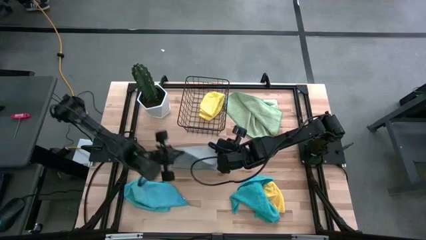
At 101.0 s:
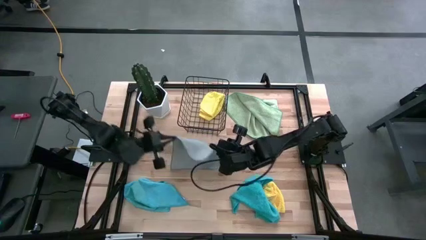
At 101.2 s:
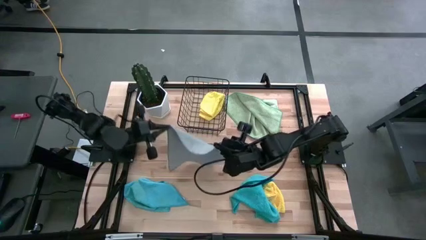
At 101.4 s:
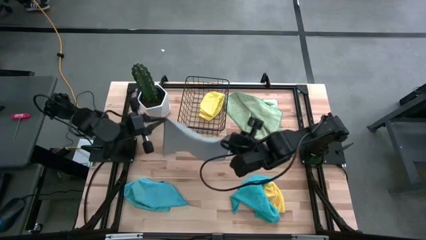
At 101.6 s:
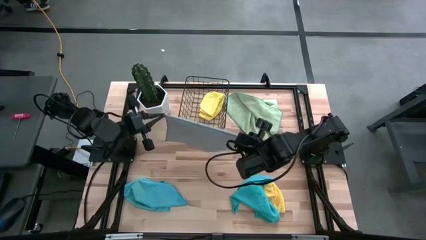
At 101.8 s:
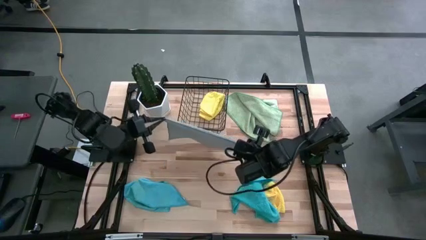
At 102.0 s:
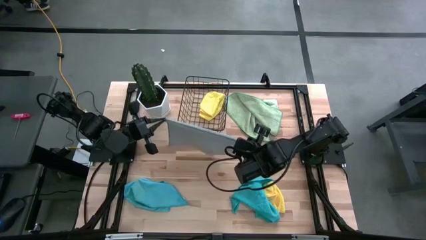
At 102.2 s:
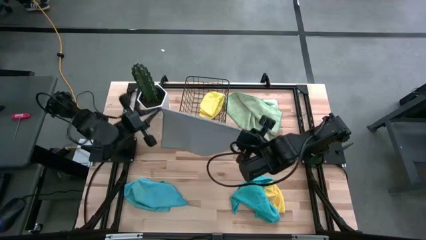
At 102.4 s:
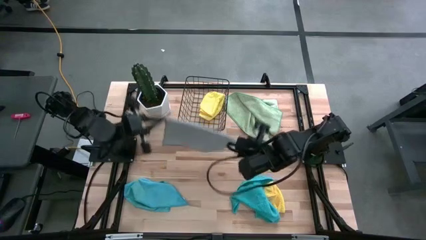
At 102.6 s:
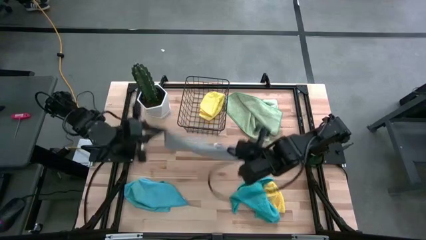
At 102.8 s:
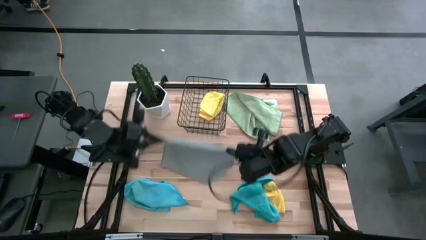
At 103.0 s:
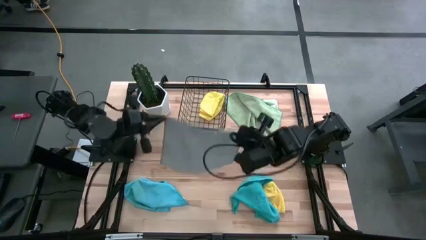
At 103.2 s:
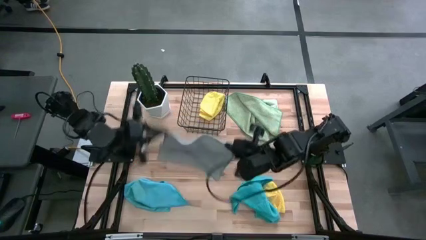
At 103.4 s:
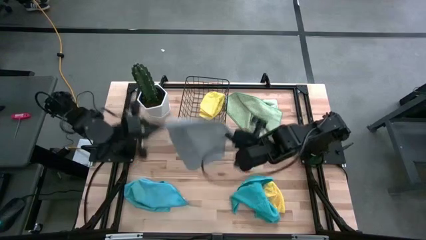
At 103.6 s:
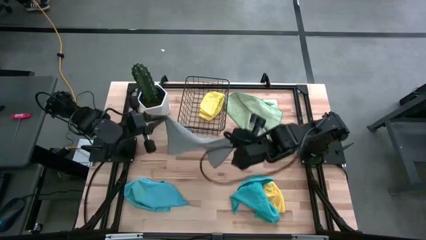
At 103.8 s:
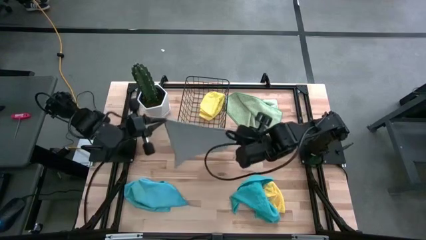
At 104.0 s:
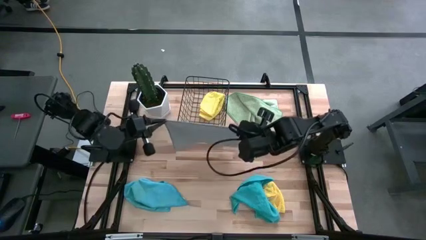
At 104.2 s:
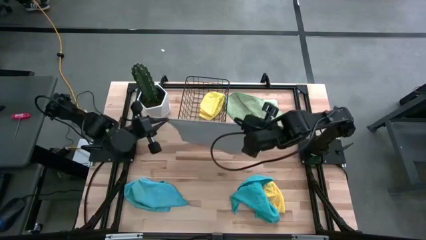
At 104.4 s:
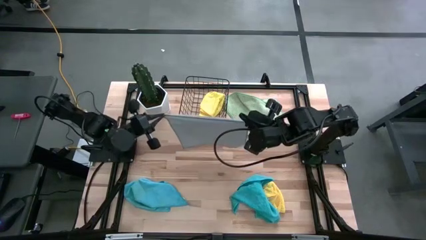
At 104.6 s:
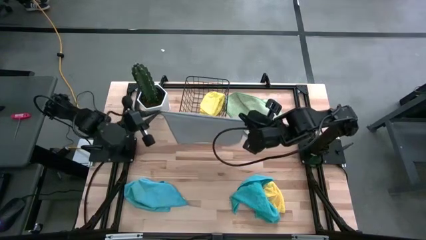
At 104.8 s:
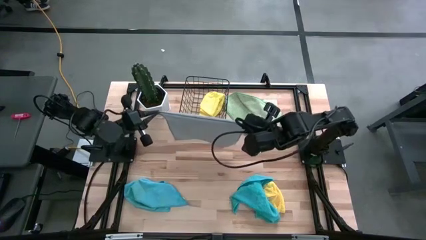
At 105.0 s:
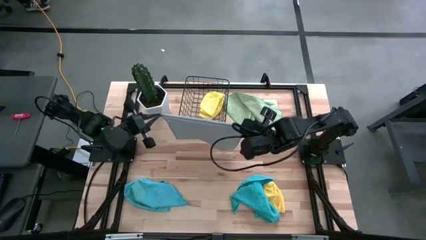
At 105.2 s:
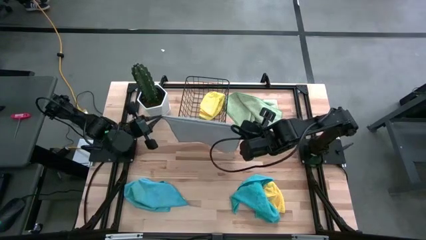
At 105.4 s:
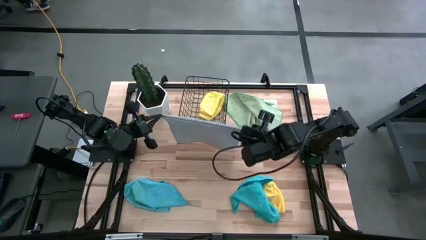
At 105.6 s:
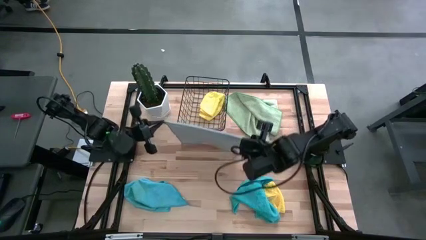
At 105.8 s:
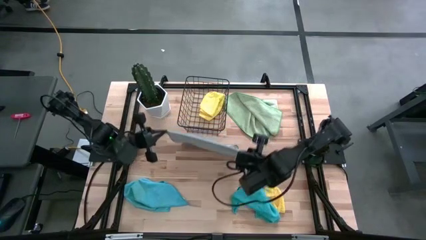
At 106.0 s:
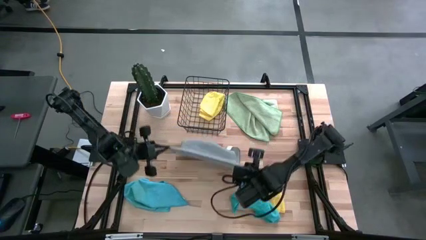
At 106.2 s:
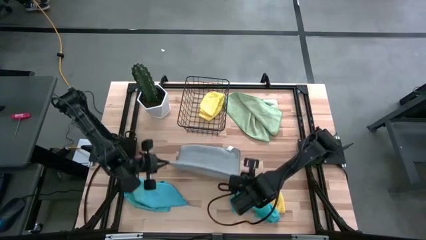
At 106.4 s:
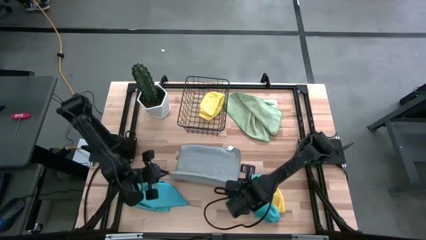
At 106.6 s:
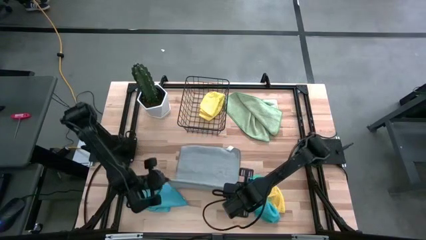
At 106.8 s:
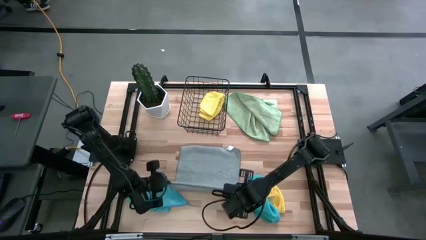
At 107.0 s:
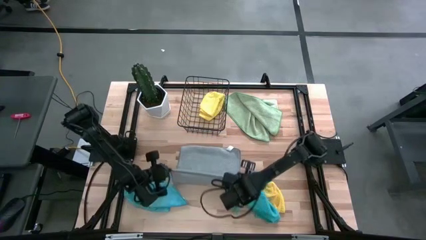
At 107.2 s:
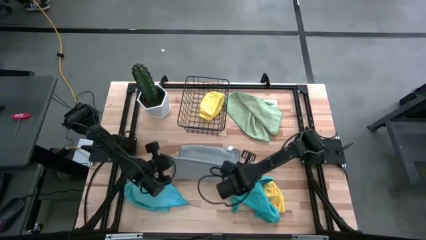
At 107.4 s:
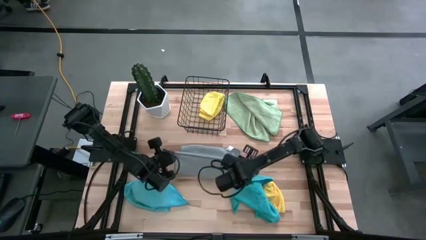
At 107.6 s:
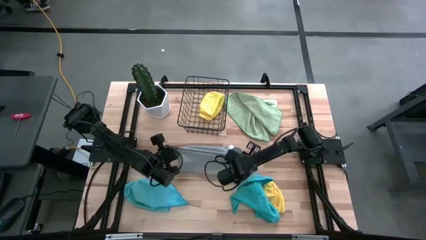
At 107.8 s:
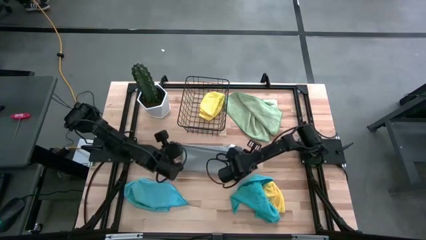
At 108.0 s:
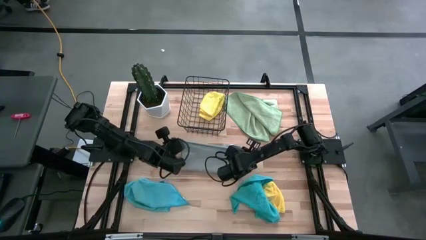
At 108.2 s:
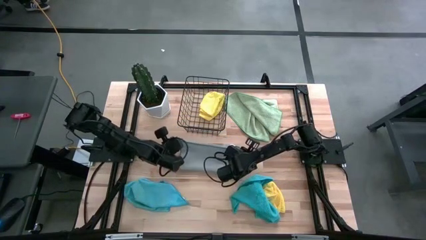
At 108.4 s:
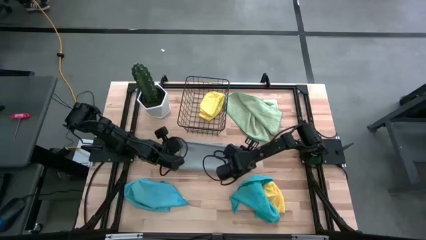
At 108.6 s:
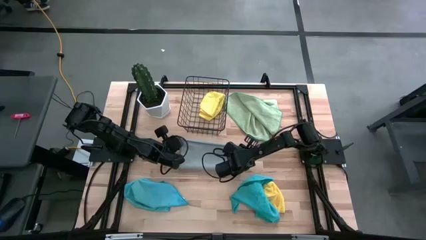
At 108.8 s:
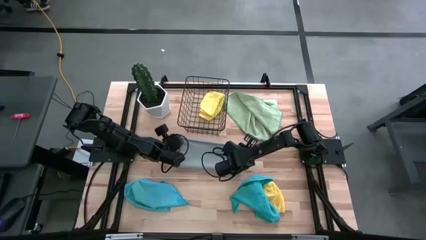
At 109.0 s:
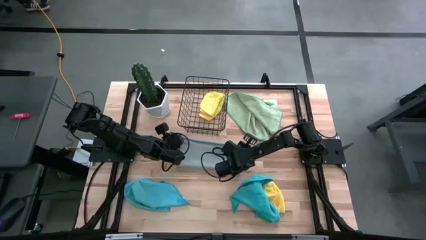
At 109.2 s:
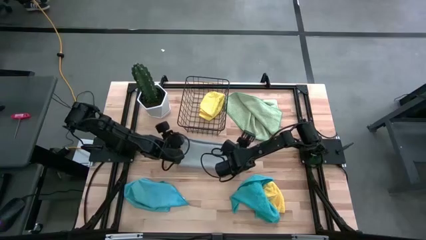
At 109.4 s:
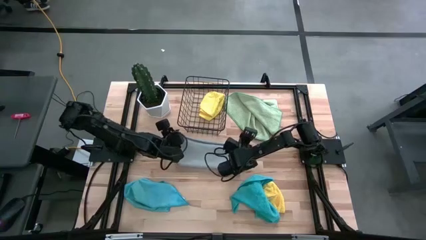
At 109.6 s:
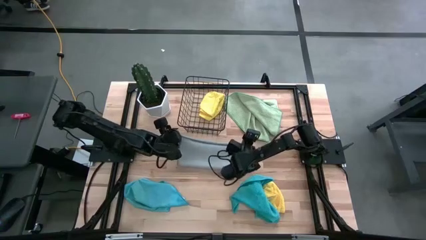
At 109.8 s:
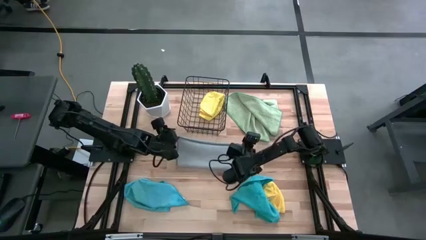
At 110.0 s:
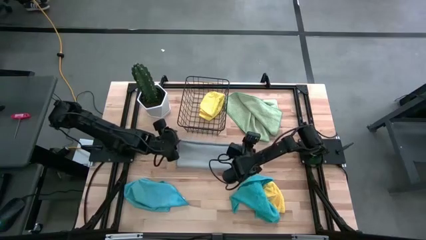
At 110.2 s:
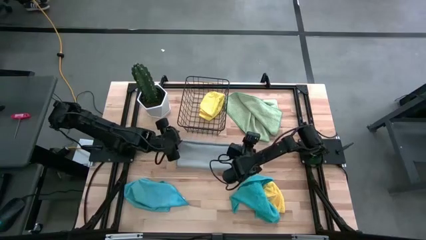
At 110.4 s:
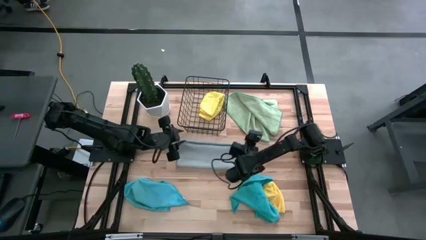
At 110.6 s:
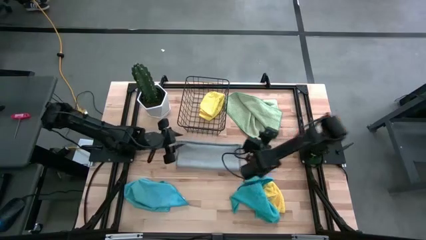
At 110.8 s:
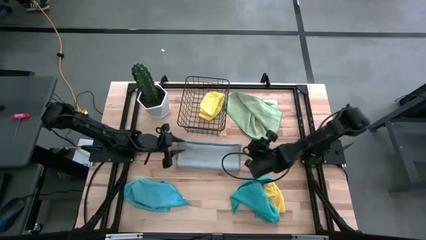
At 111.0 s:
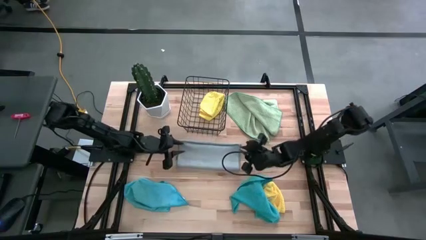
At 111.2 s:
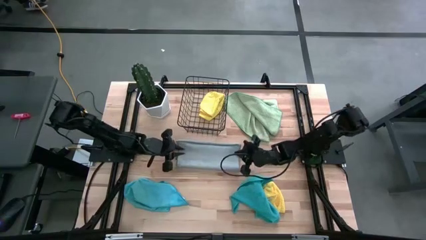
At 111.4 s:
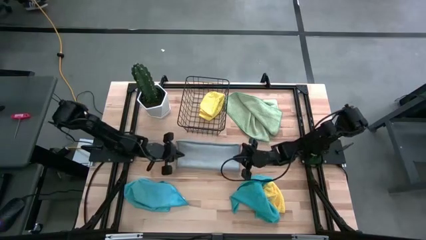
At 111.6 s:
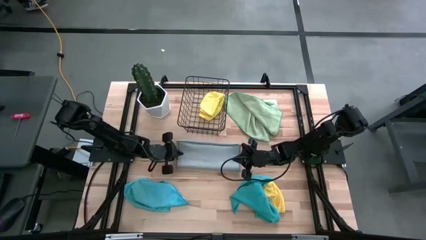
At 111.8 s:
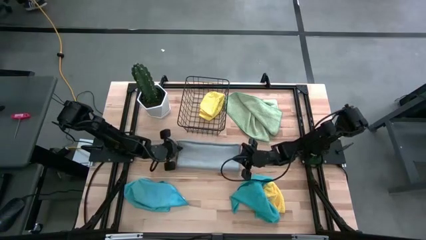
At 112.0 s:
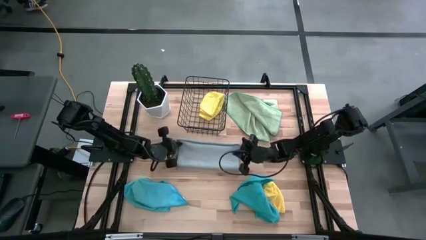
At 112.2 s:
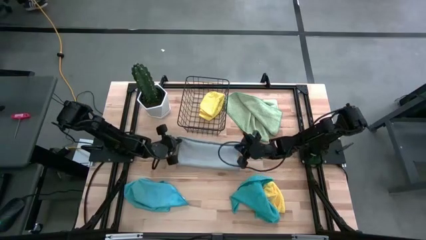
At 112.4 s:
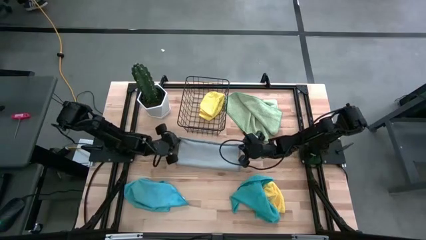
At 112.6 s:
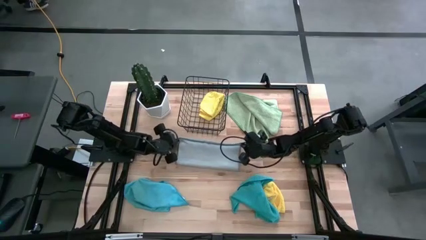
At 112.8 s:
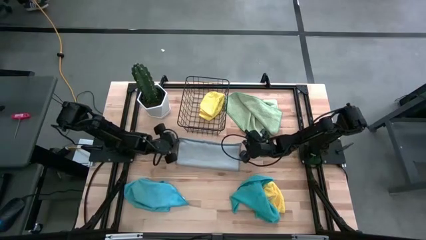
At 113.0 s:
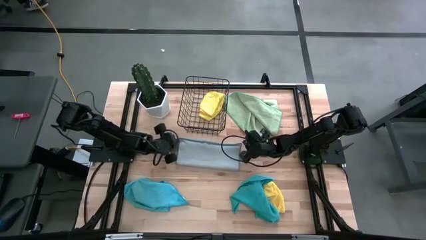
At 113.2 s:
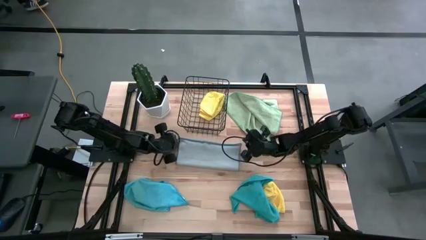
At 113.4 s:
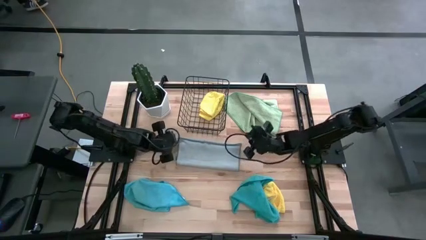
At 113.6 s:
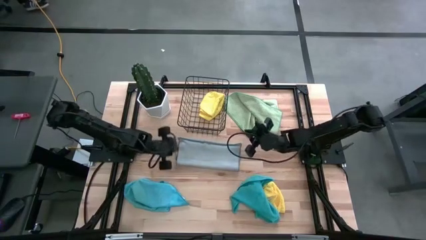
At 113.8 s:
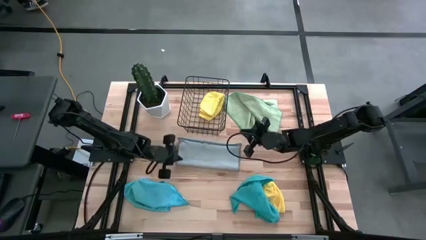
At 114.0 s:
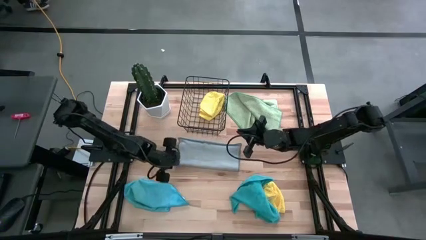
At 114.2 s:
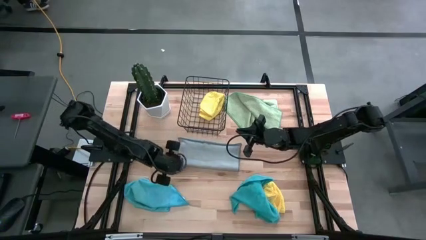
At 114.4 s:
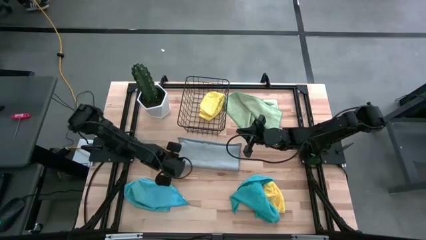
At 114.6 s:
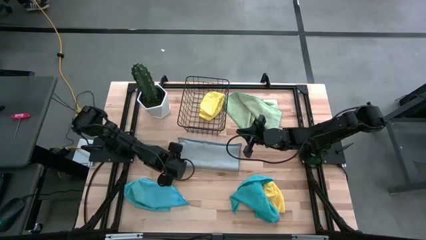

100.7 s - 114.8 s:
Task: Fold microfiber towels
Fold the gray microfiber cloth

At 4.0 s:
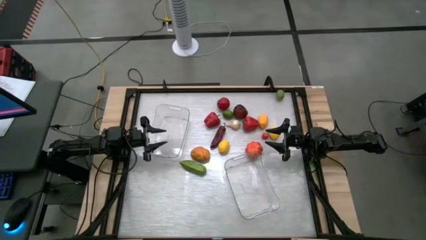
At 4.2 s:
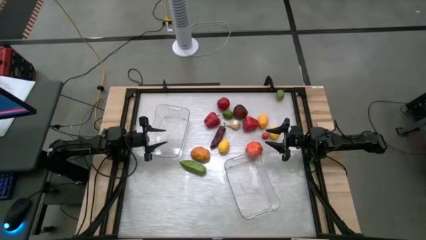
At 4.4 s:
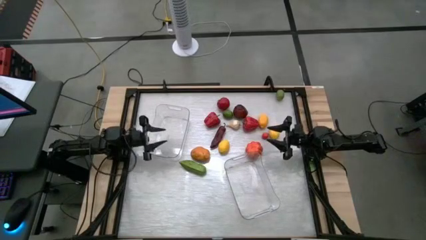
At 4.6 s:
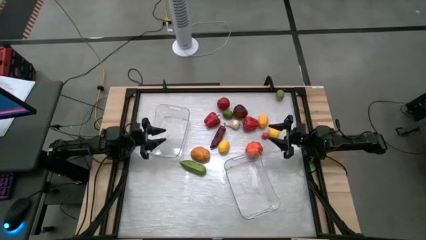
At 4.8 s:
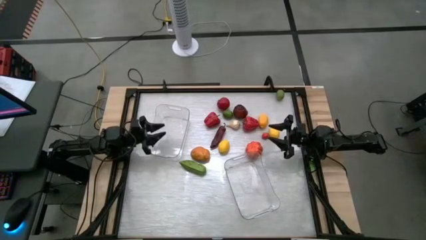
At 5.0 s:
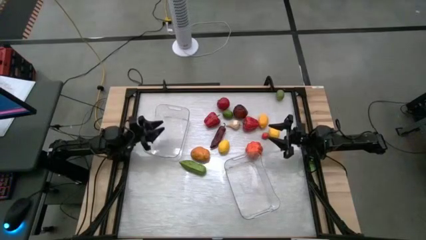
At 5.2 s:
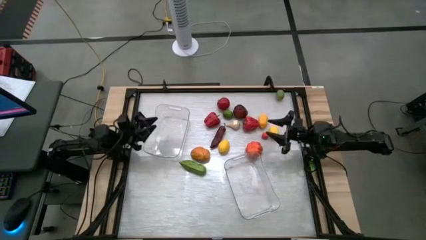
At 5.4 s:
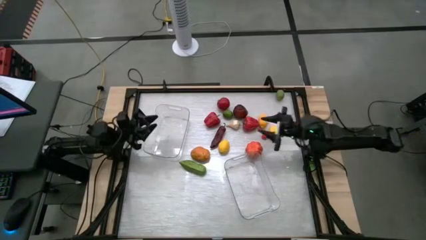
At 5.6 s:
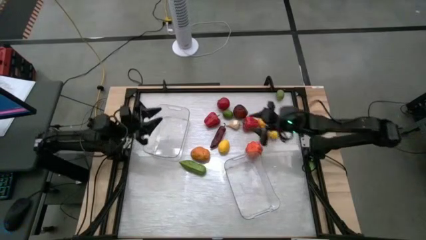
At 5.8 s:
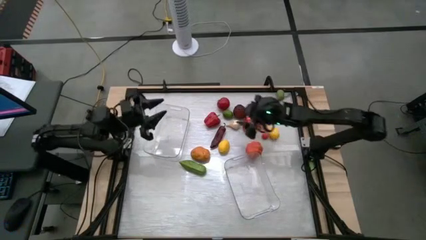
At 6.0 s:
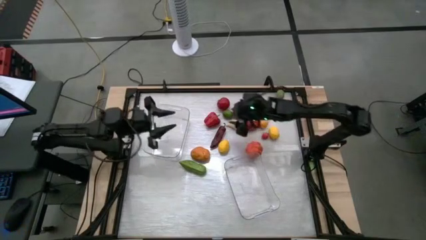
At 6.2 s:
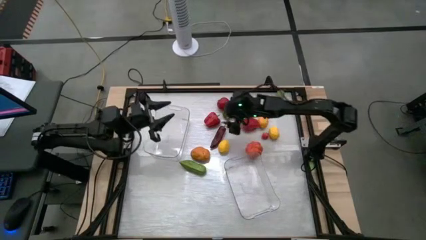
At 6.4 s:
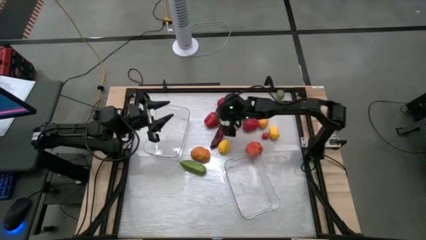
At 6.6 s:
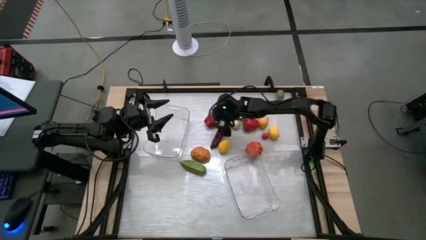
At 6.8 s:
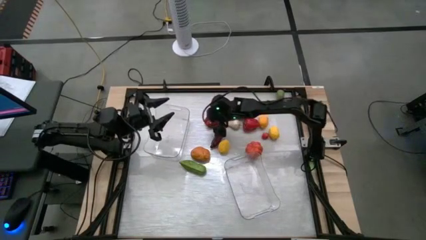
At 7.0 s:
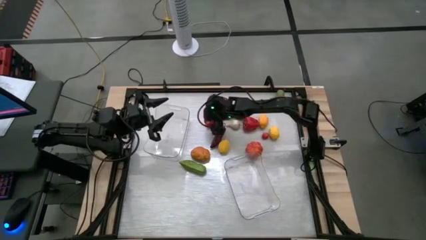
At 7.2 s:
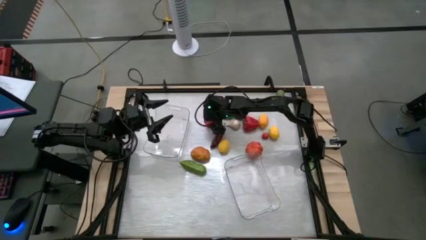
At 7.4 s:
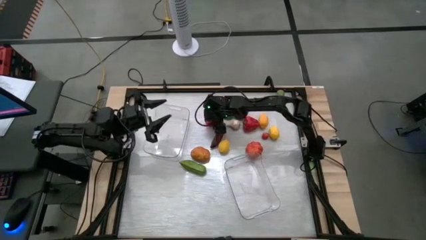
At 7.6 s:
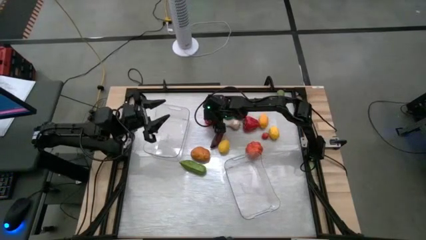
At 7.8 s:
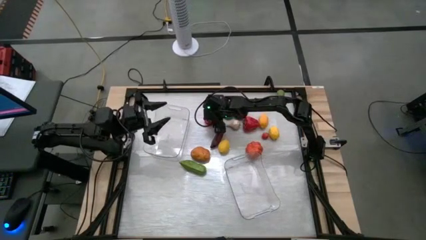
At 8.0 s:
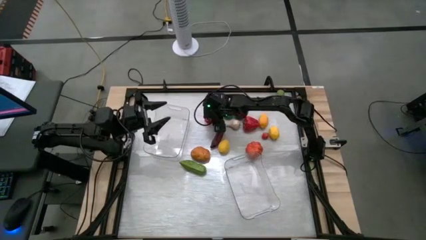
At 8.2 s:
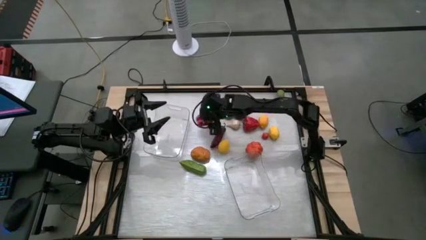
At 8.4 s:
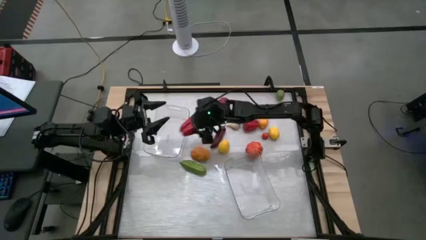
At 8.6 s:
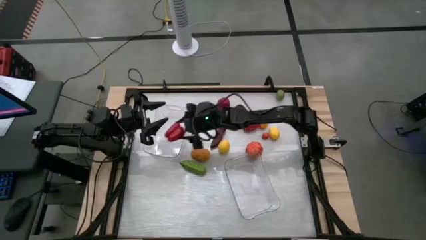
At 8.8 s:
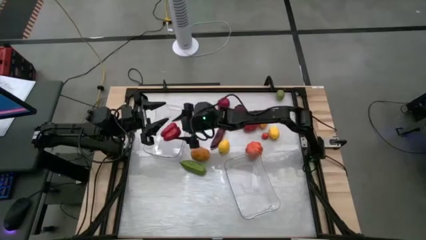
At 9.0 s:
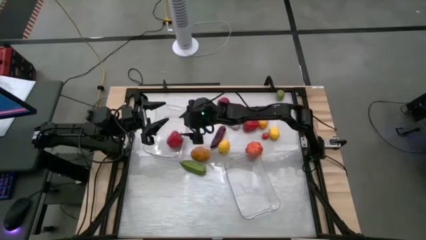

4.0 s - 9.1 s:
Task: Sort produce into baskets
Put the left red bell pepper into the left transparent bin
